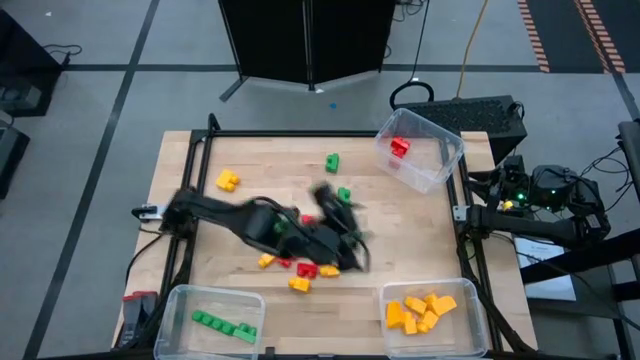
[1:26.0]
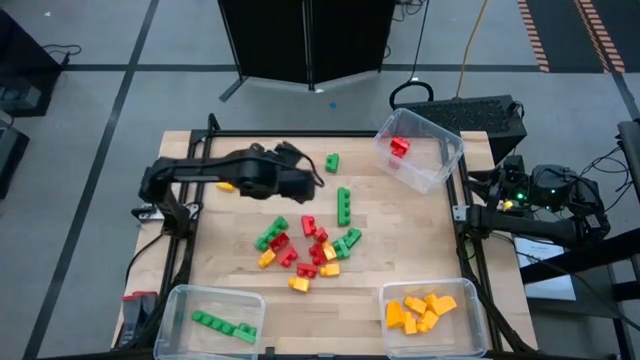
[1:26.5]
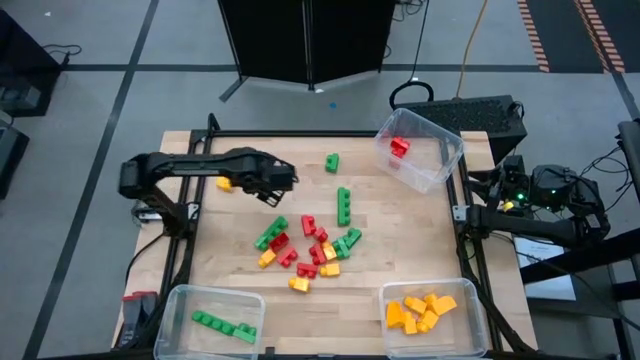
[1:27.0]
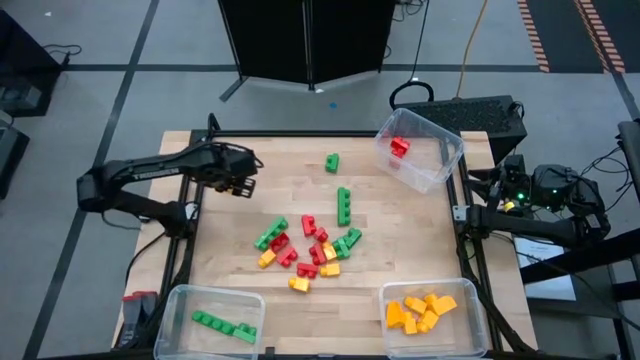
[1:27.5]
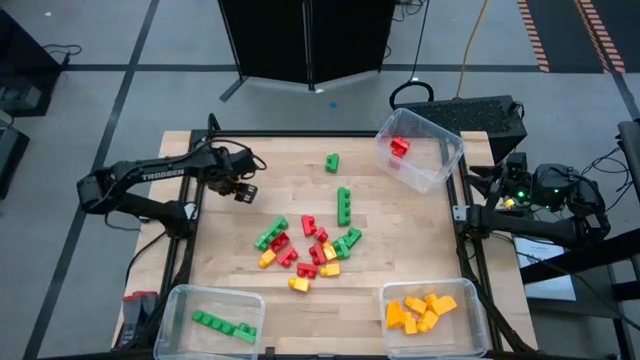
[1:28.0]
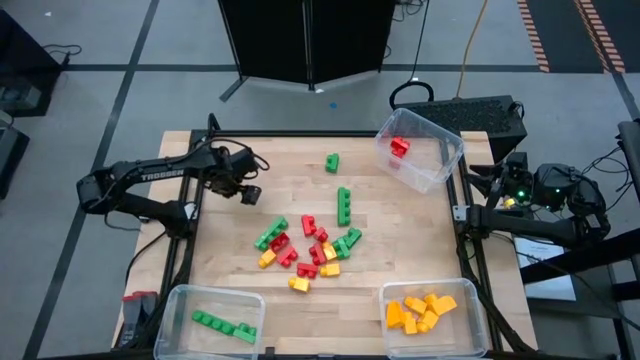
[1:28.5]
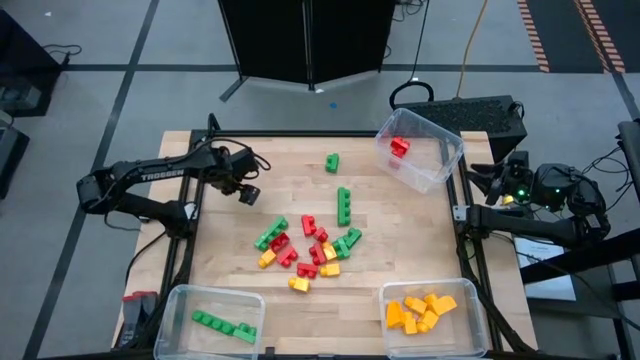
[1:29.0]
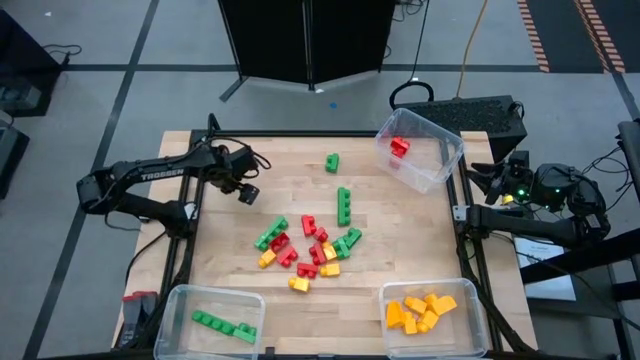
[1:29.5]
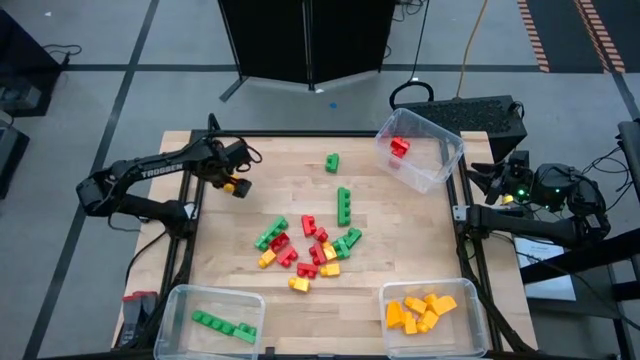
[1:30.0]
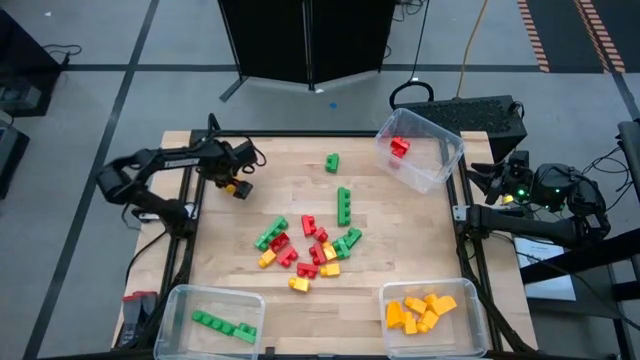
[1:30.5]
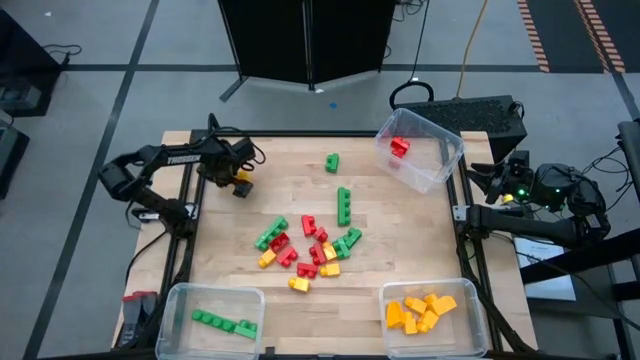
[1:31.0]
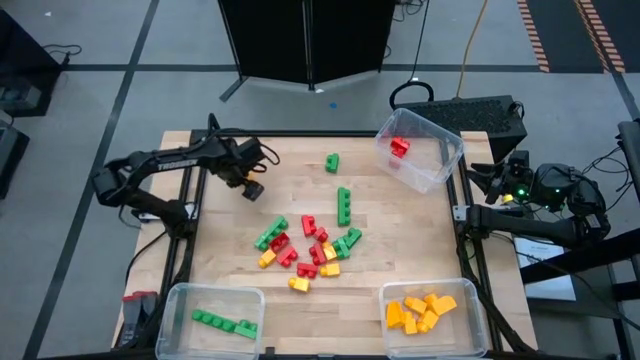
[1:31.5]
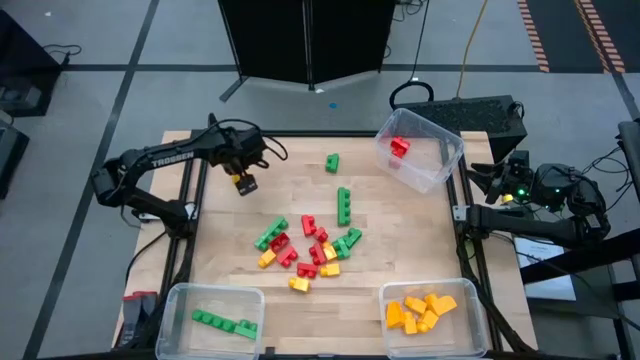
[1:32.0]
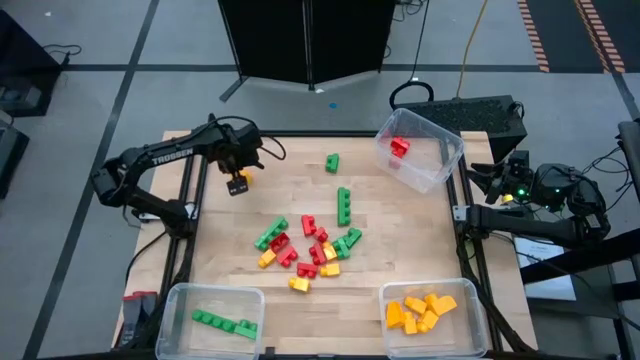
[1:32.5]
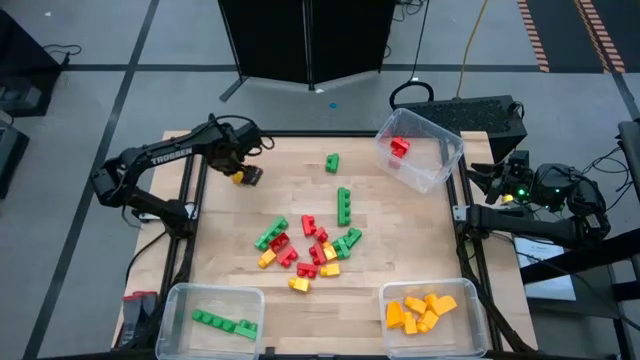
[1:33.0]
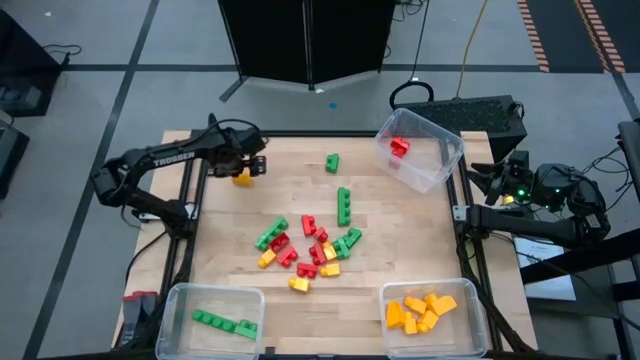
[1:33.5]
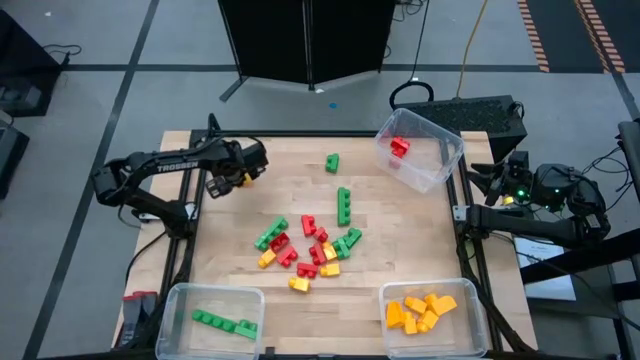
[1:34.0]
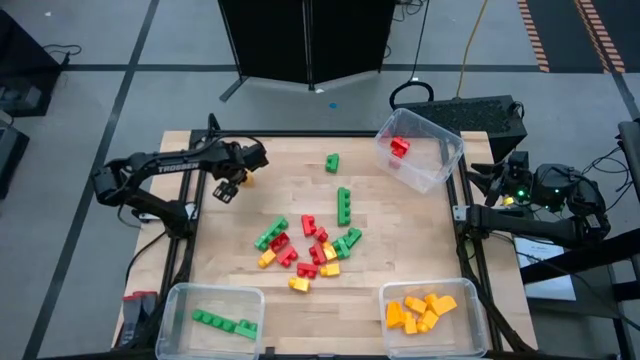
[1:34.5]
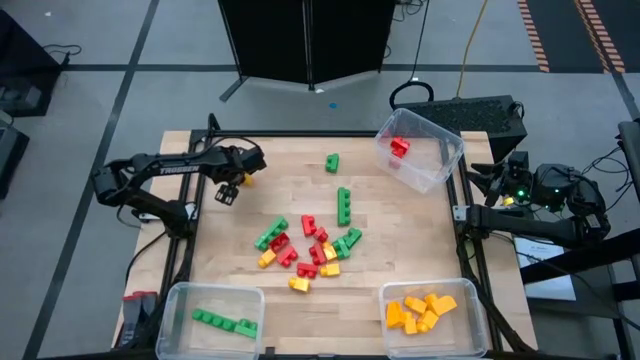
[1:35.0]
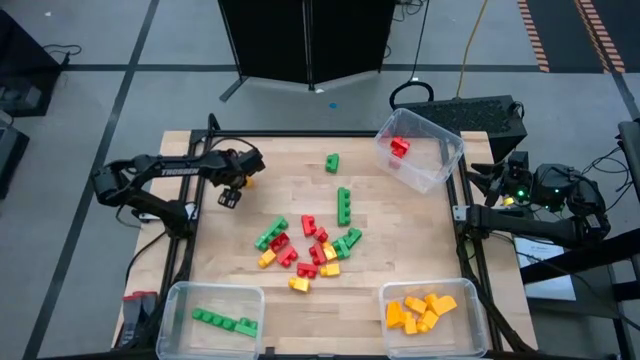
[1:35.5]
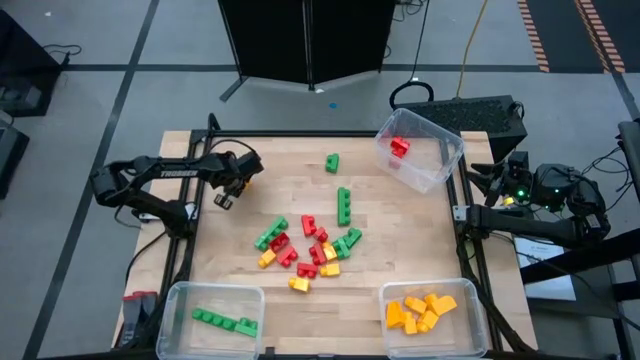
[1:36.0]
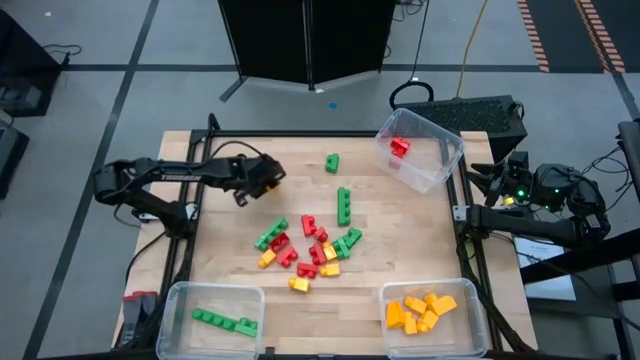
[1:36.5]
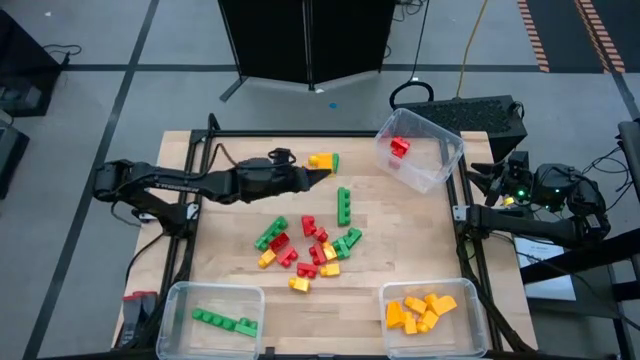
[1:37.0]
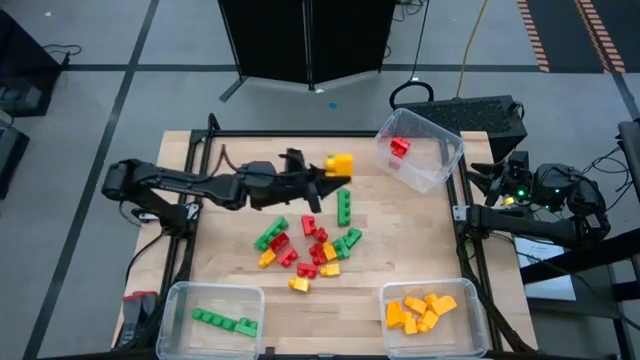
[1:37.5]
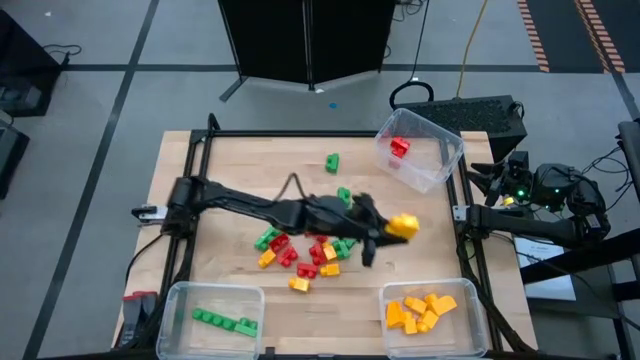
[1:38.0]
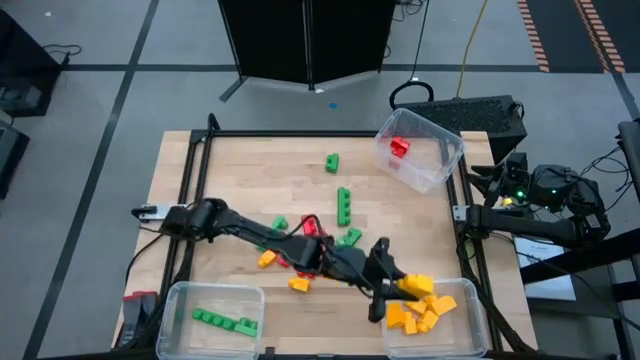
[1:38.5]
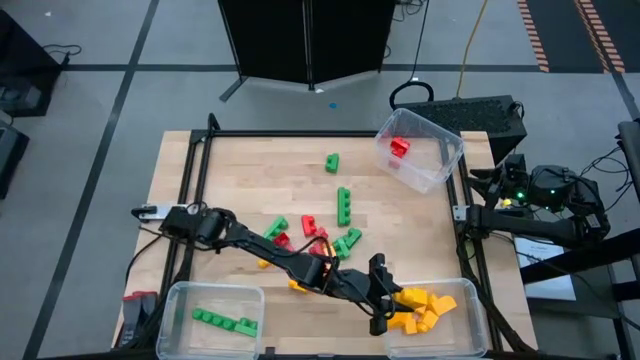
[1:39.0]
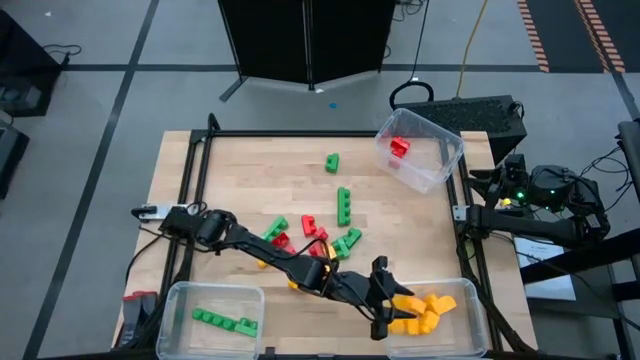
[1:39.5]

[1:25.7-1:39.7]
Task: Sort blocks
Put the yellow game piece into the bottom right transparent bin

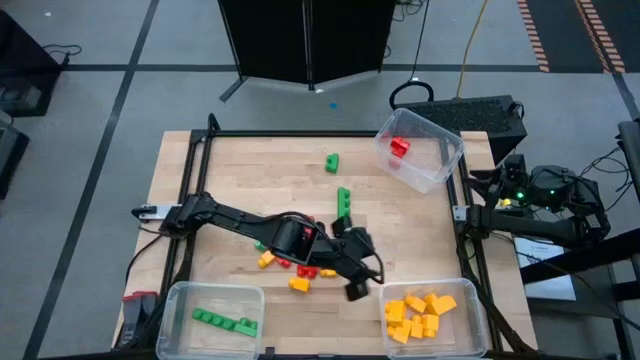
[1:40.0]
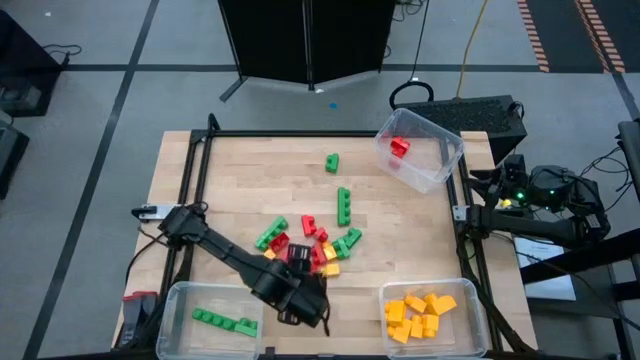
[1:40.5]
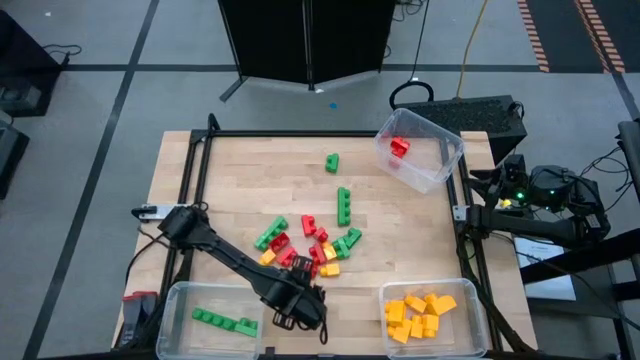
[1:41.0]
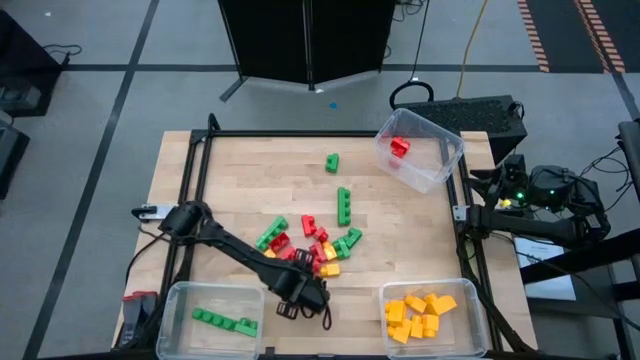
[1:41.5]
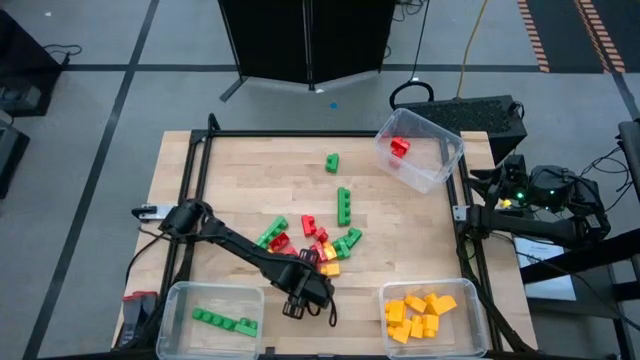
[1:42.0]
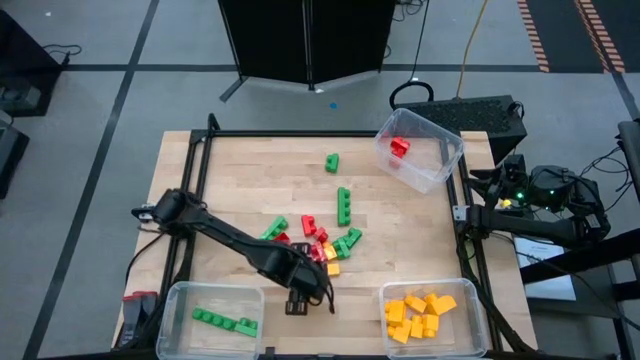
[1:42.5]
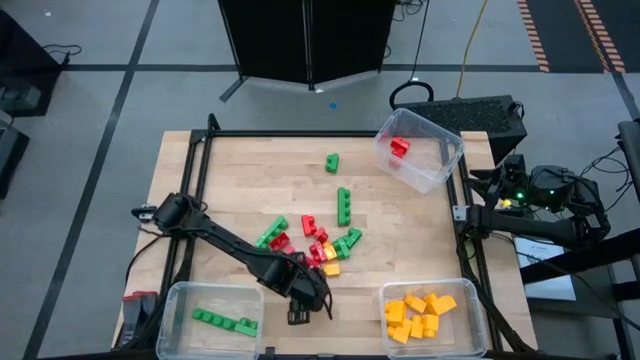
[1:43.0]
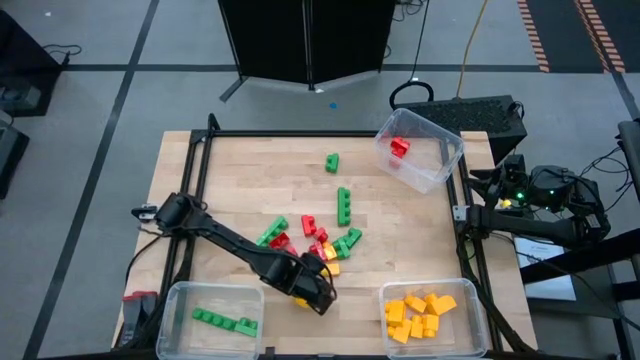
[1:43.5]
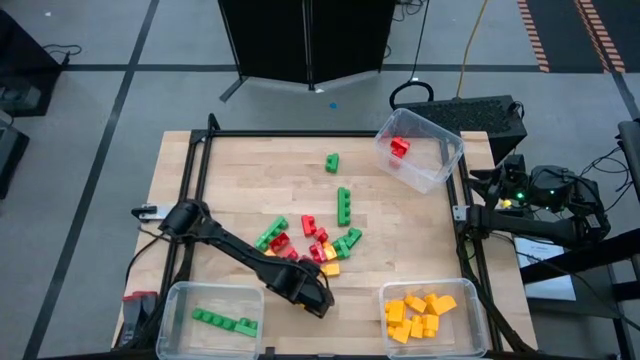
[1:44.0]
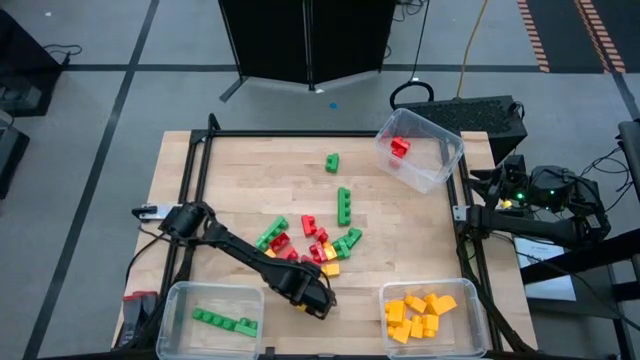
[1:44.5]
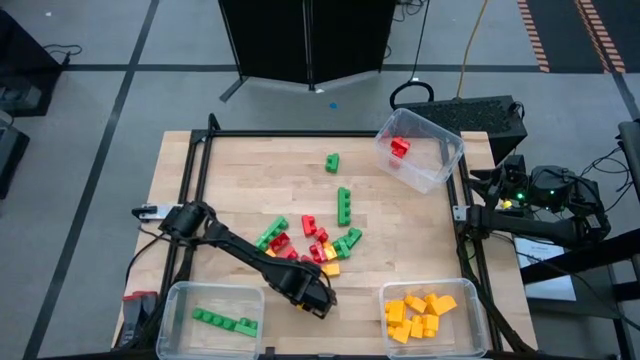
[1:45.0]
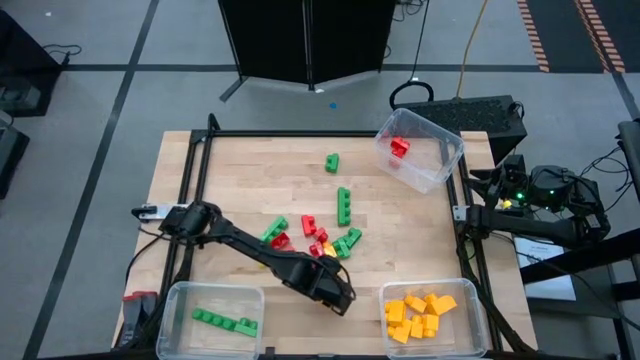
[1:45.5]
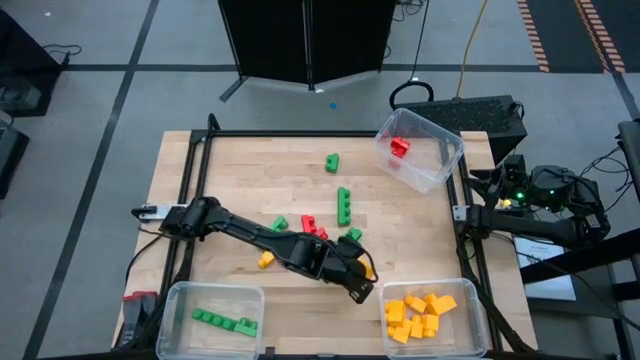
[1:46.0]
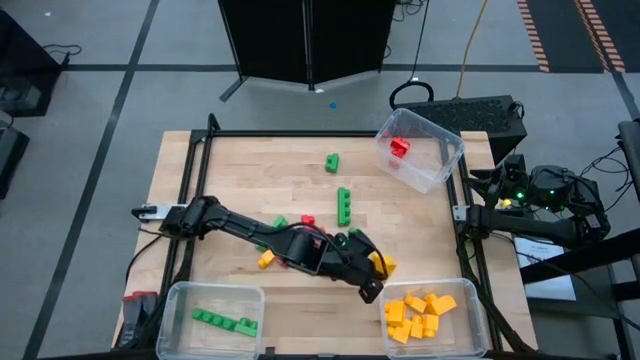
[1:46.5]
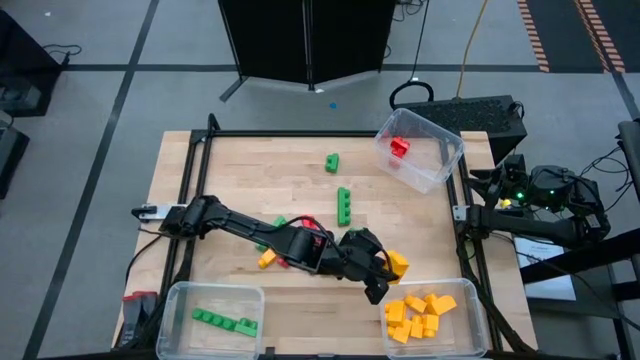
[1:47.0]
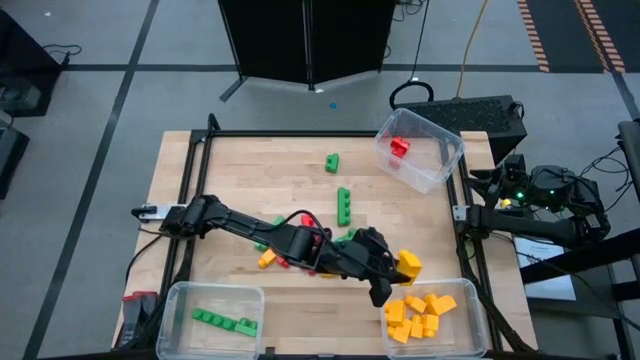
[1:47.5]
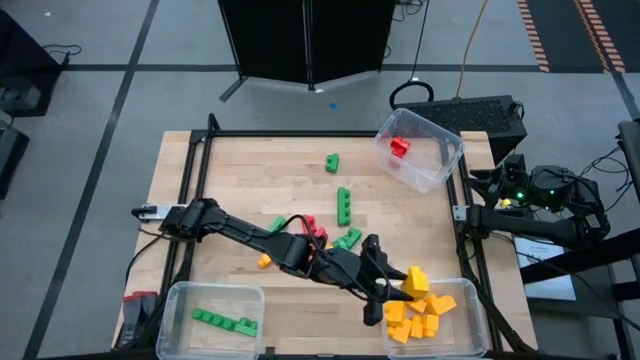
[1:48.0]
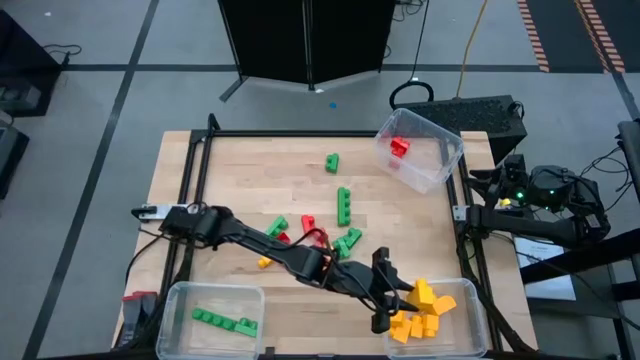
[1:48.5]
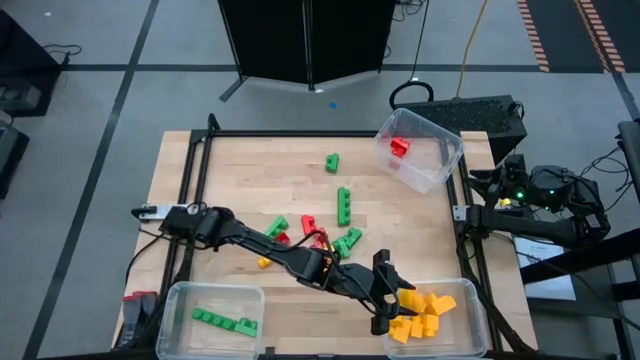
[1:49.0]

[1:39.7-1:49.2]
Put the yellow game piece into the bottom right transparent bin
